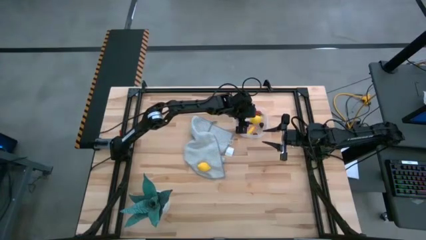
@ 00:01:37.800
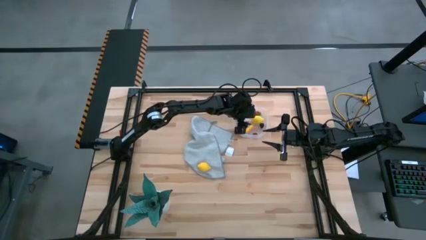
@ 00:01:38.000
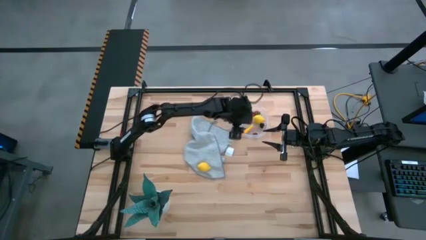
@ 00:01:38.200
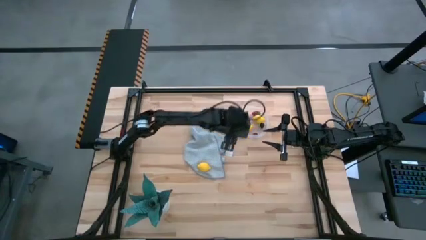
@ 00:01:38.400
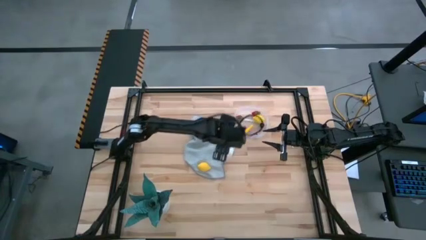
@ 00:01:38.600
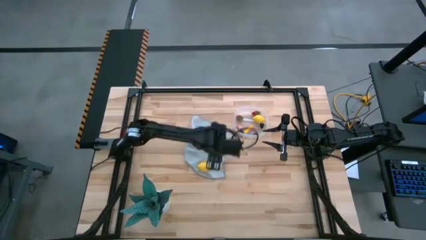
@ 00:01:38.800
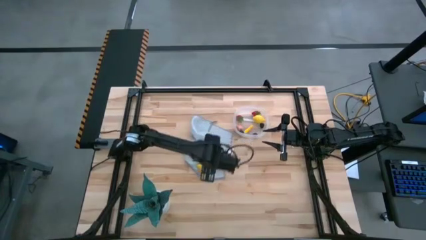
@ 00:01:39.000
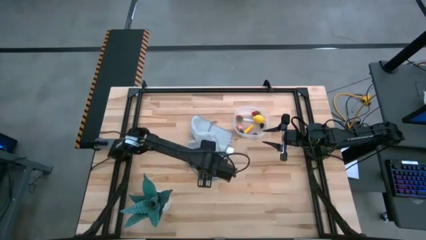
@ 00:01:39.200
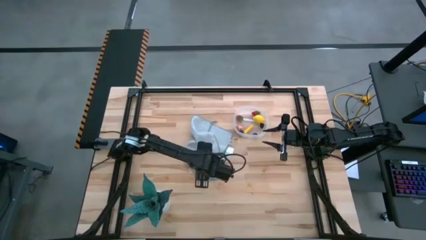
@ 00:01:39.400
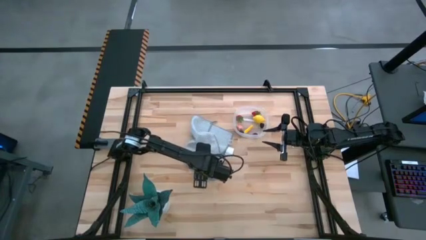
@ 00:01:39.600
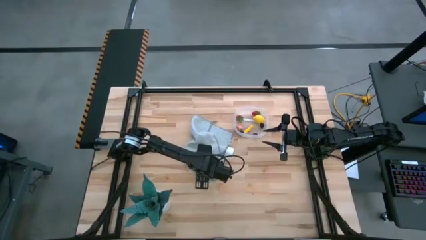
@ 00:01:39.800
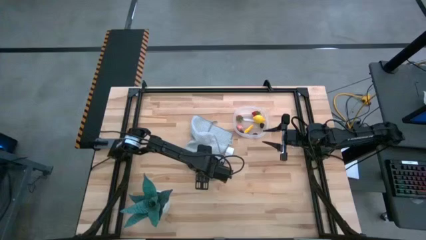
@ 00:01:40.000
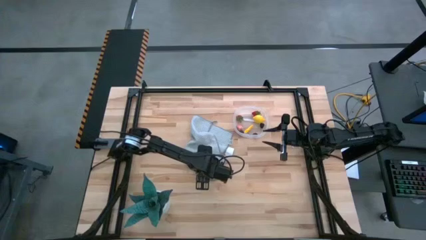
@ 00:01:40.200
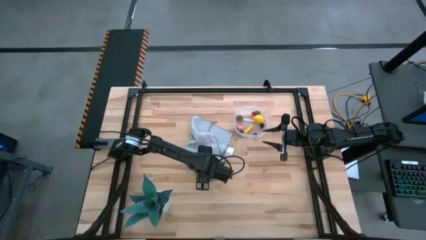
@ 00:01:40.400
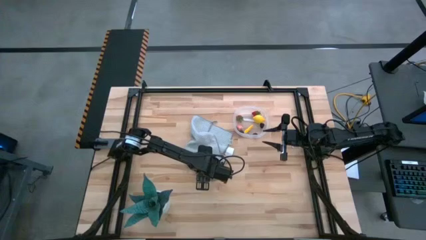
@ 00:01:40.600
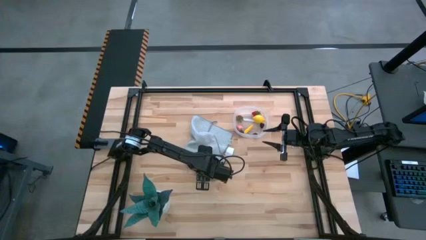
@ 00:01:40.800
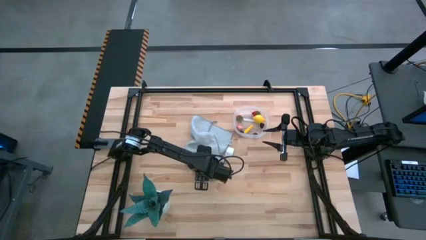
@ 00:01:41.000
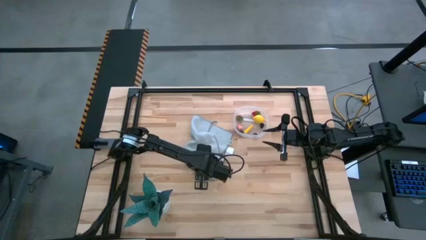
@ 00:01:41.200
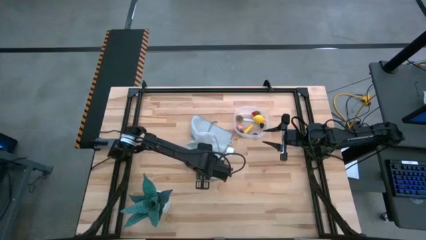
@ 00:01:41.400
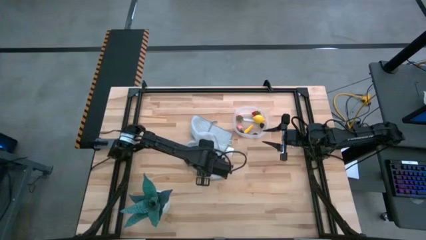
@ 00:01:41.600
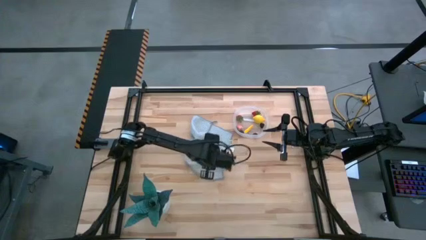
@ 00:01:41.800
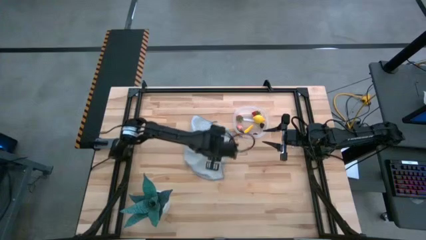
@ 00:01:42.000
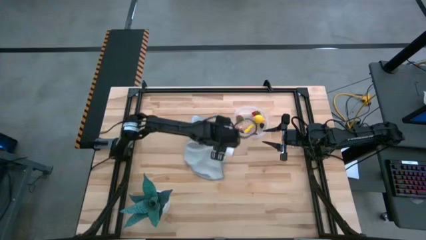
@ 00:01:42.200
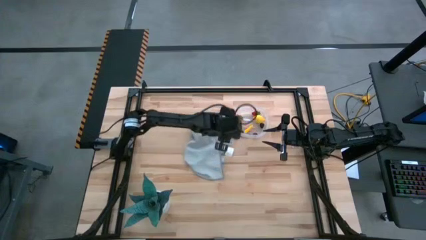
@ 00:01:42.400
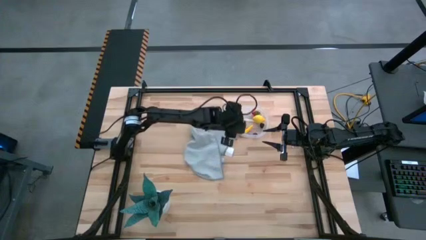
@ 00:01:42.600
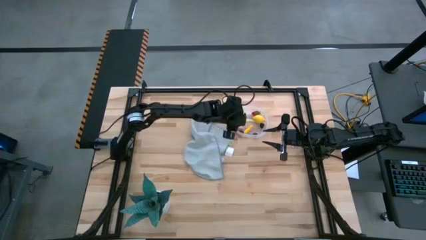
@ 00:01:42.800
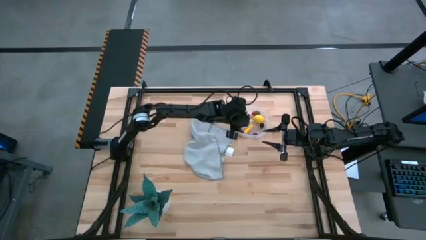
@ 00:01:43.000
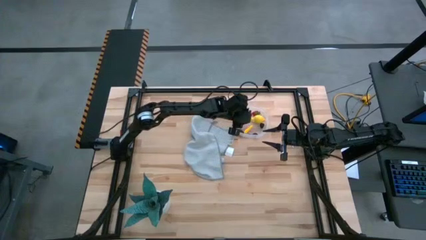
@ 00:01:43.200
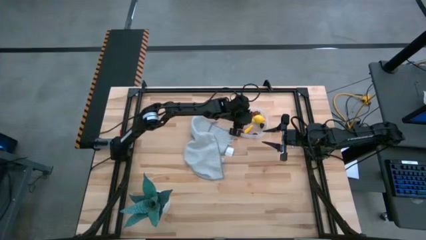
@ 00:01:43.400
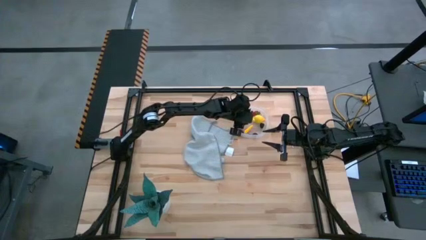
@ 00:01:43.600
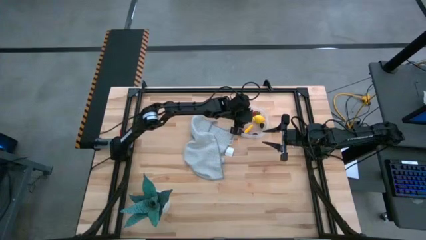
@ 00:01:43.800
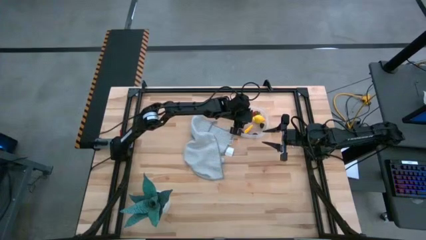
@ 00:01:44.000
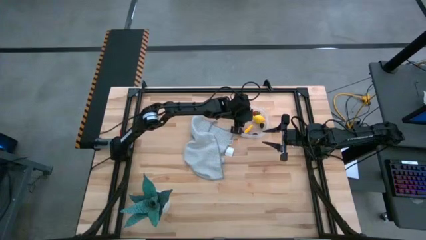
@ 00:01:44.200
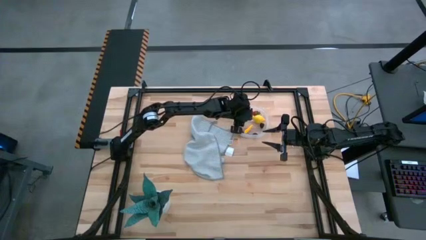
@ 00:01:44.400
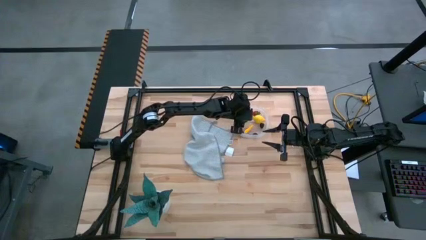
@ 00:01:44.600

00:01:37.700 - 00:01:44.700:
Task: Pick and placing Produce into tupperware
Put the lemon into the transparent bin

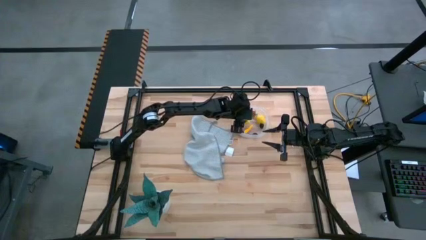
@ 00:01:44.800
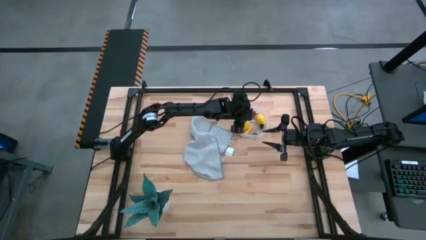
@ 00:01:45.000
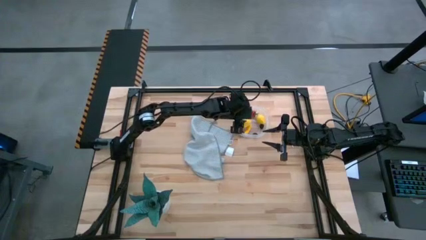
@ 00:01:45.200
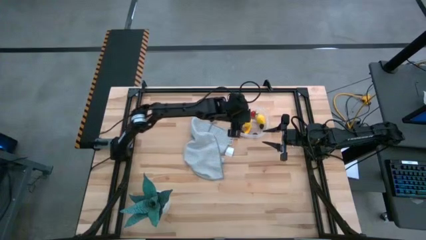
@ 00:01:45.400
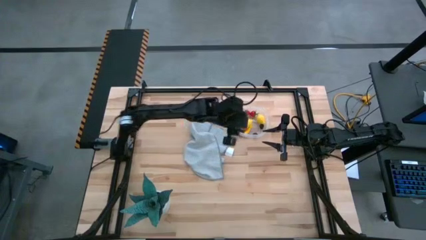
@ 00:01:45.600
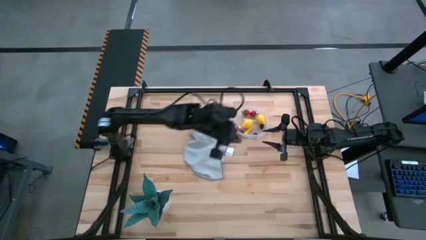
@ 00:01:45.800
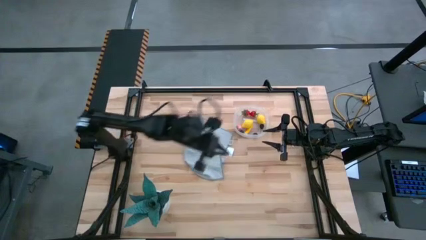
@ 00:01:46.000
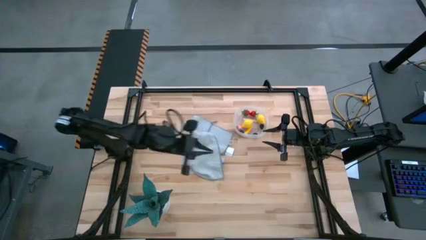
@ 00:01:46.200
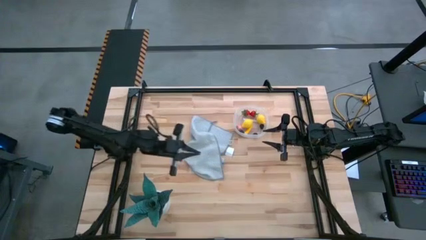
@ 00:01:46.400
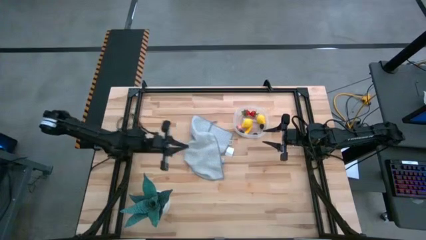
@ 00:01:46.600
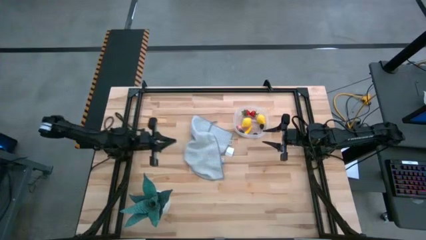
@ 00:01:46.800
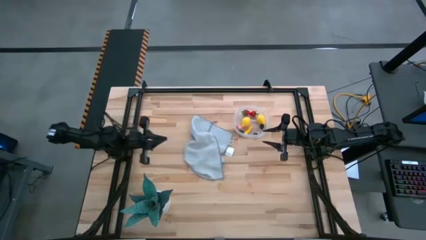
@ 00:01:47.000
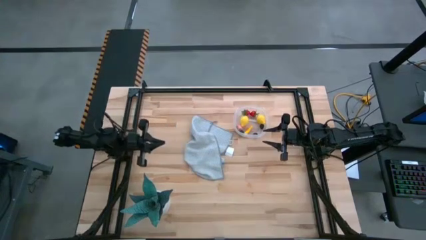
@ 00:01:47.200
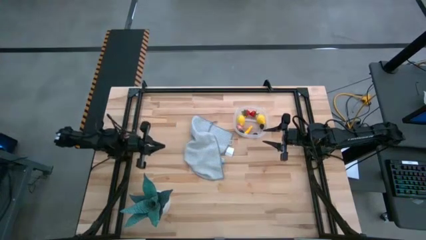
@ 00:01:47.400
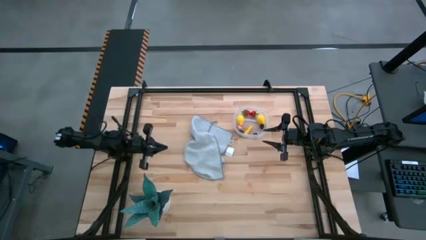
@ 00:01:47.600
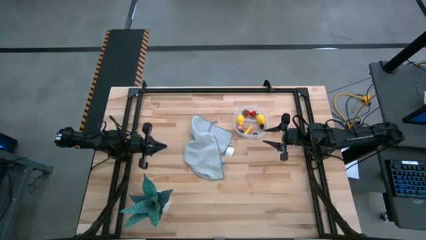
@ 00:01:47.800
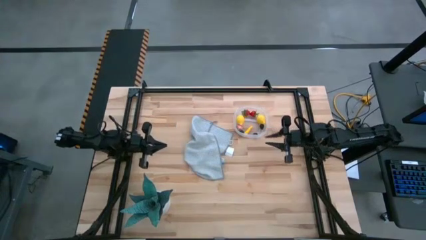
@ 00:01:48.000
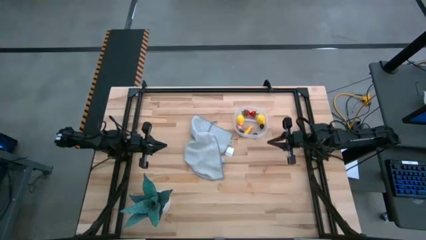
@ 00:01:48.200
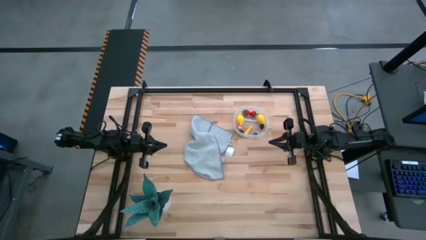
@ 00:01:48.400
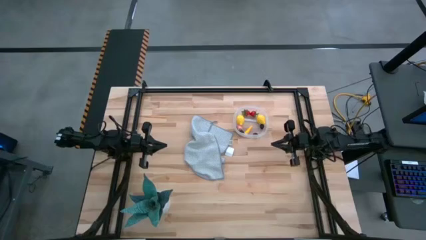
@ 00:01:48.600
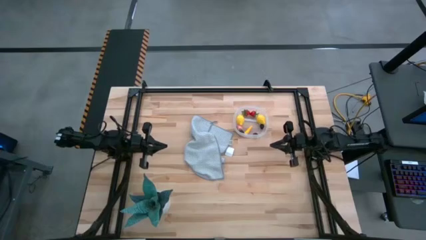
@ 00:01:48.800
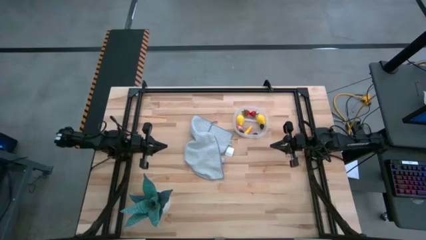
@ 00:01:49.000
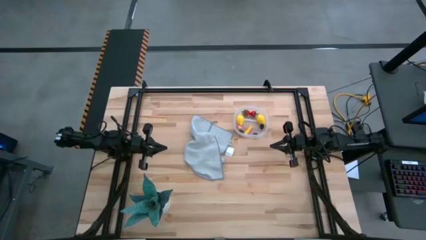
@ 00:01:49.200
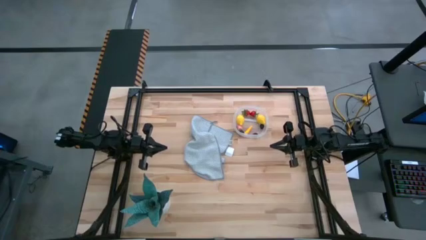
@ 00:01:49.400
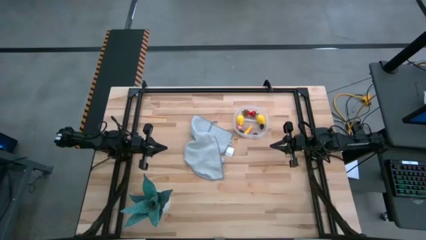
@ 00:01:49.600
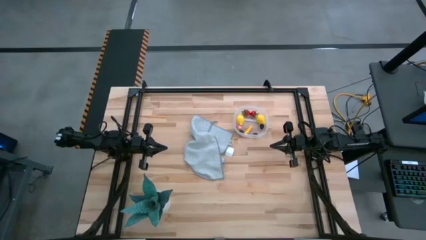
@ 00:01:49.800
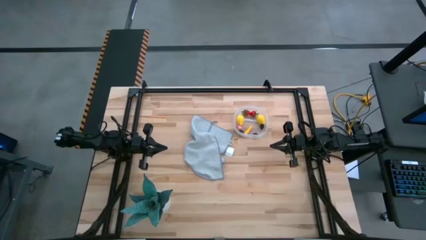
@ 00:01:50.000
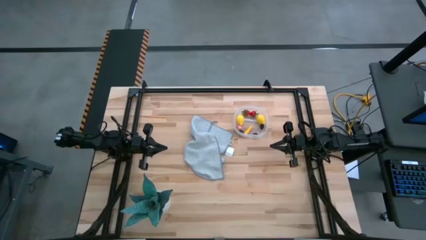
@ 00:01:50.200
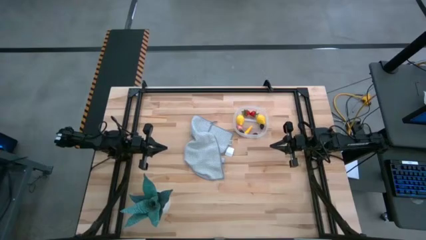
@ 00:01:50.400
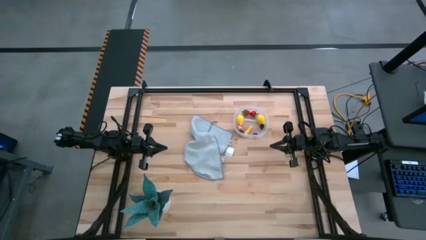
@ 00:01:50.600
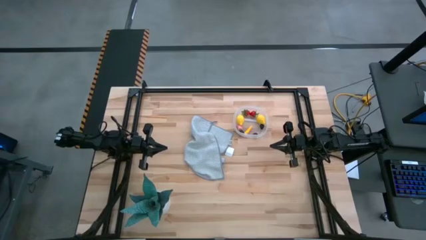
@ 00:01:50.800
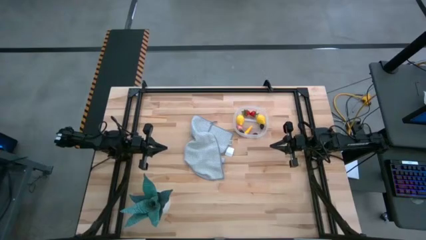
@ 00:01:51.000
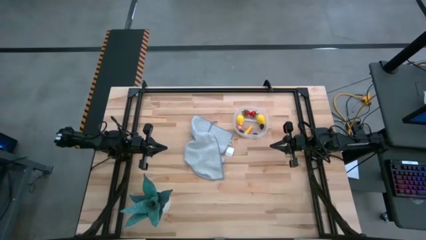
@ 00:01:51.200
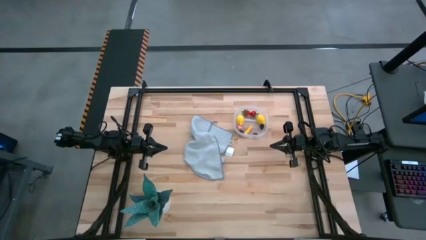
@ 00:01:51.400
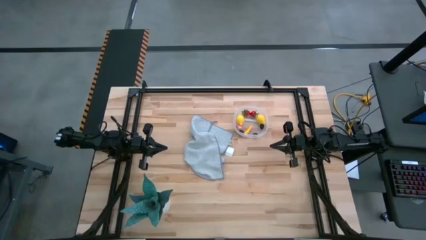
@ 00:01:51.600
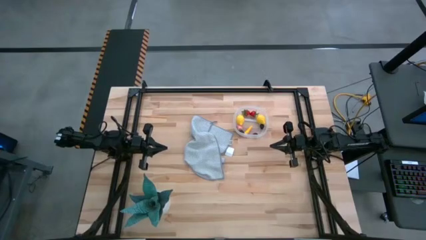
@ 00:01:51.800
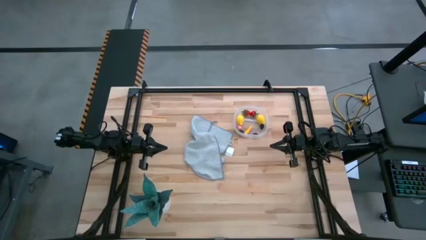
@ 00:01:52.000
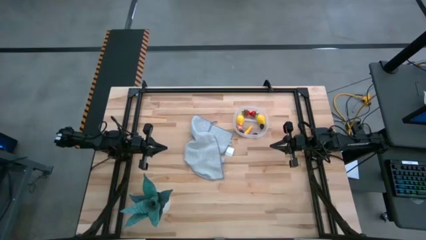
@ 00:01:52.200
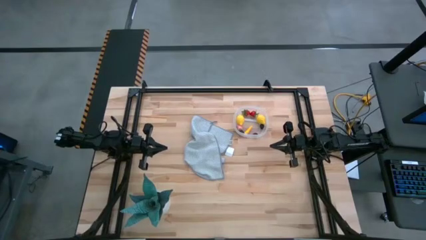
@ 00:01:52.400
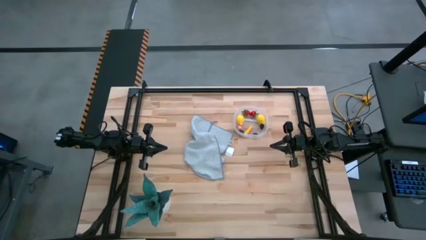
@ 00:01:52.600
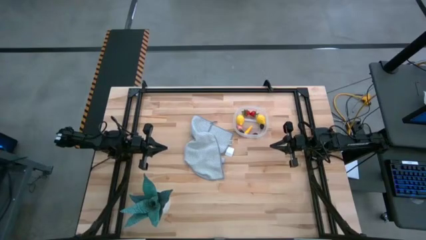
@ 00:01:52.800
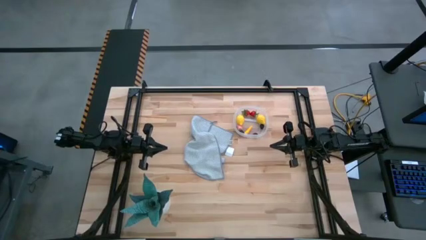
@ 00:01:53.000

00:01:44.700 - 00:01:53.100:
Return to Home Position
